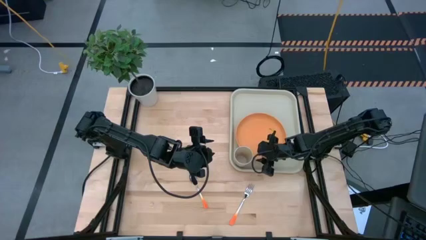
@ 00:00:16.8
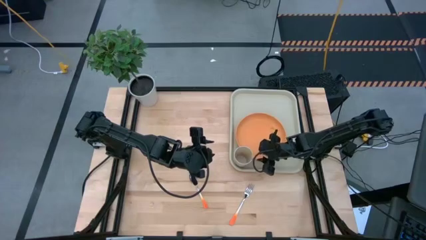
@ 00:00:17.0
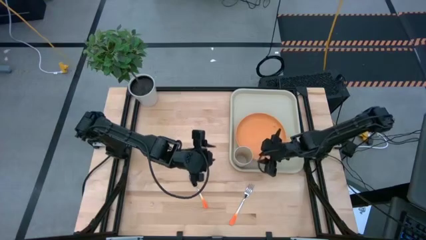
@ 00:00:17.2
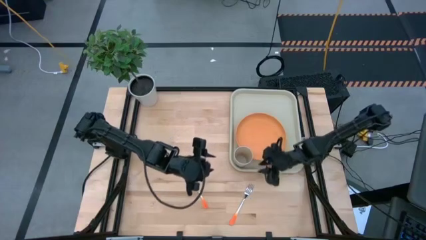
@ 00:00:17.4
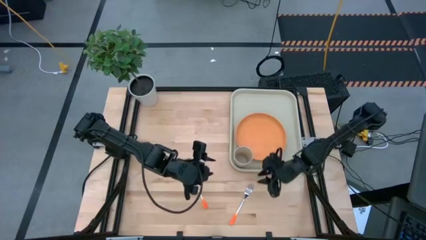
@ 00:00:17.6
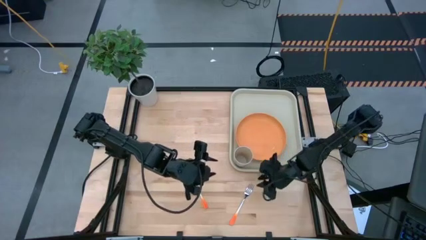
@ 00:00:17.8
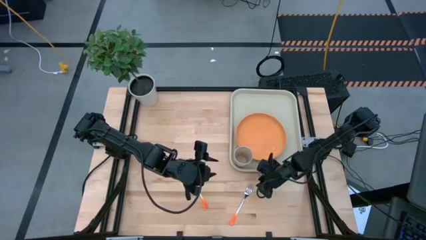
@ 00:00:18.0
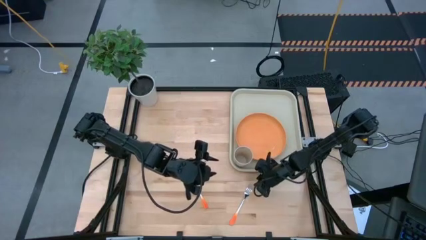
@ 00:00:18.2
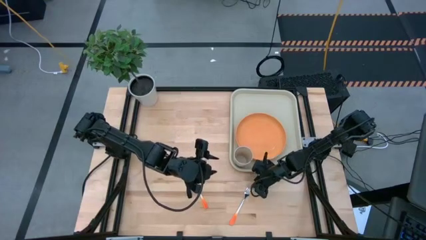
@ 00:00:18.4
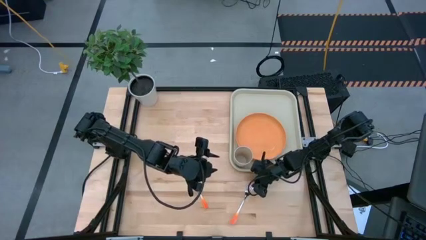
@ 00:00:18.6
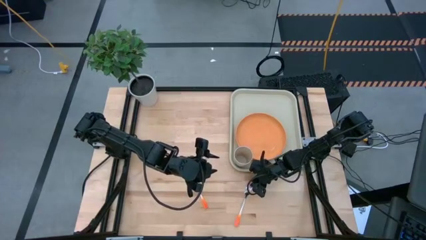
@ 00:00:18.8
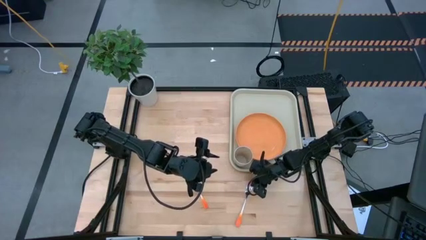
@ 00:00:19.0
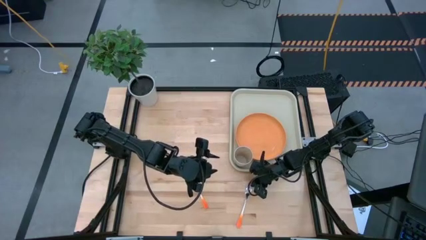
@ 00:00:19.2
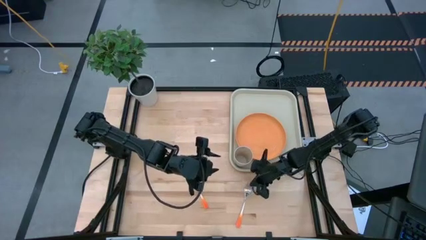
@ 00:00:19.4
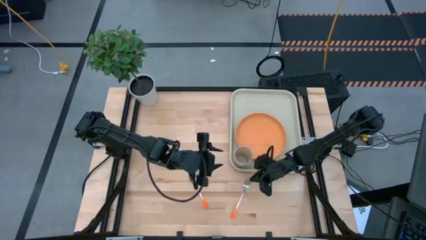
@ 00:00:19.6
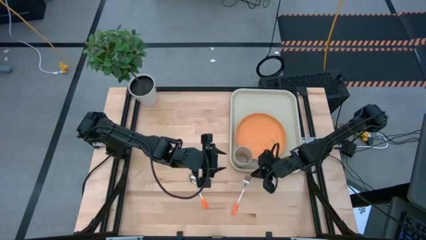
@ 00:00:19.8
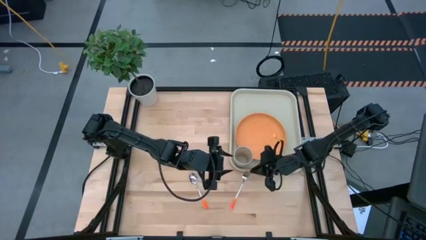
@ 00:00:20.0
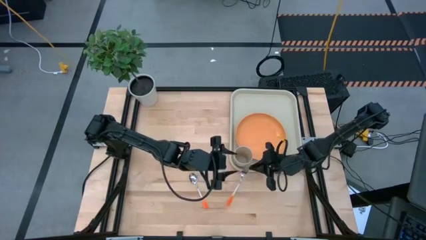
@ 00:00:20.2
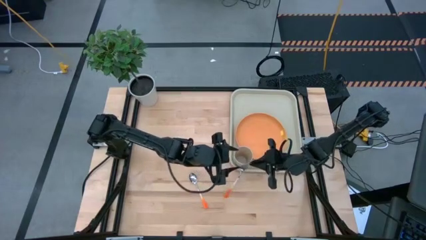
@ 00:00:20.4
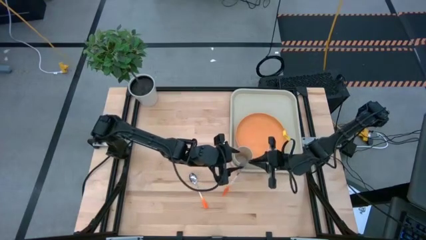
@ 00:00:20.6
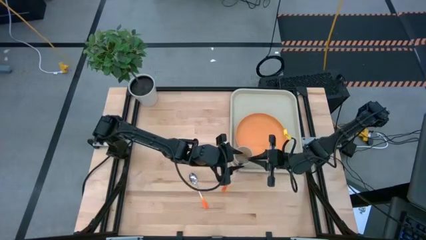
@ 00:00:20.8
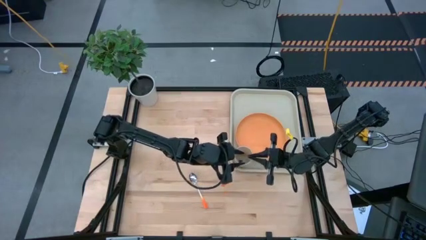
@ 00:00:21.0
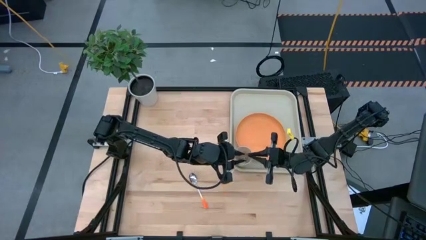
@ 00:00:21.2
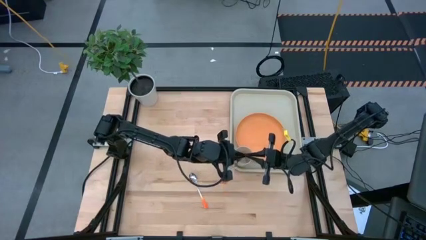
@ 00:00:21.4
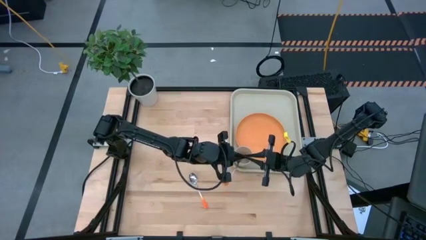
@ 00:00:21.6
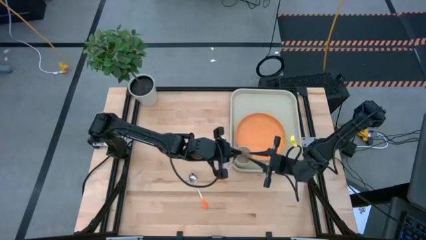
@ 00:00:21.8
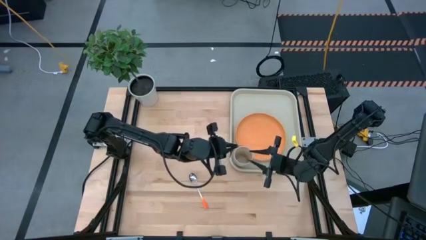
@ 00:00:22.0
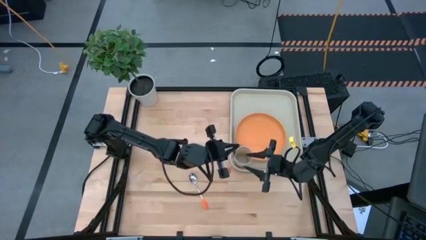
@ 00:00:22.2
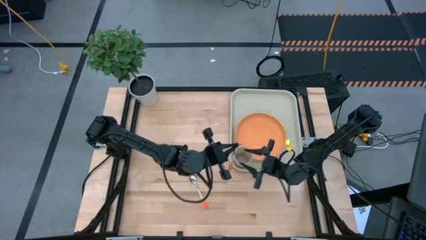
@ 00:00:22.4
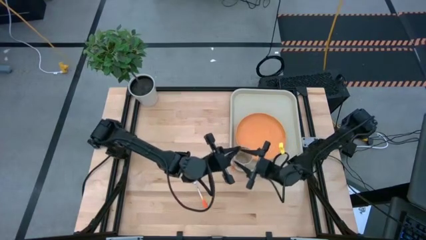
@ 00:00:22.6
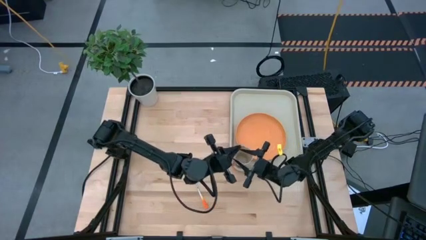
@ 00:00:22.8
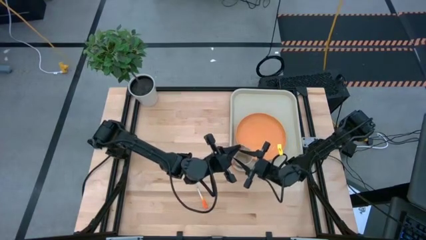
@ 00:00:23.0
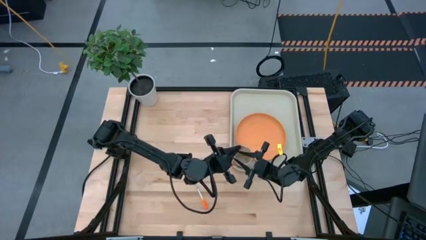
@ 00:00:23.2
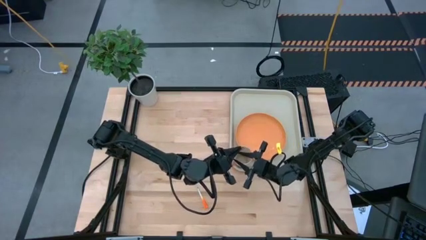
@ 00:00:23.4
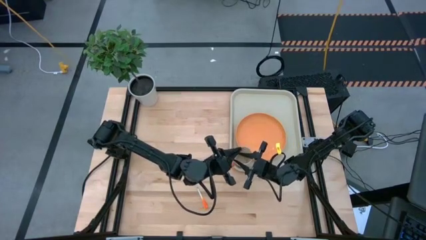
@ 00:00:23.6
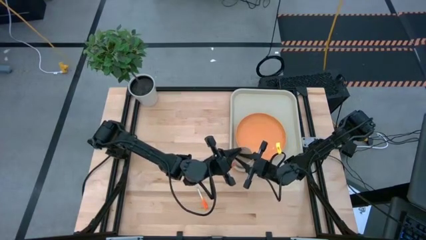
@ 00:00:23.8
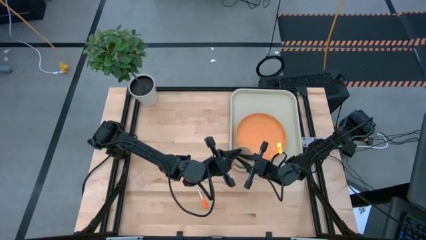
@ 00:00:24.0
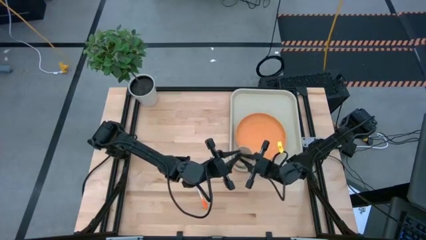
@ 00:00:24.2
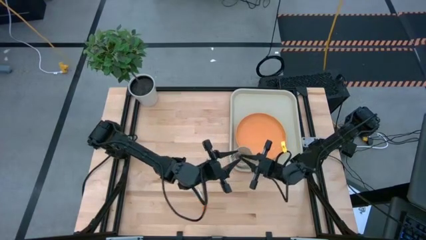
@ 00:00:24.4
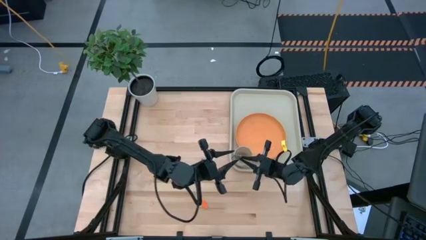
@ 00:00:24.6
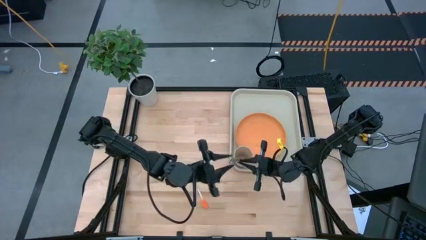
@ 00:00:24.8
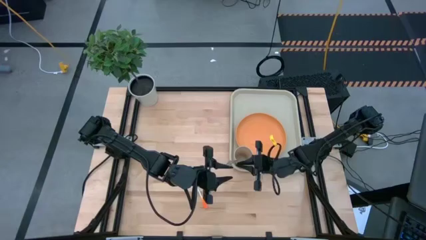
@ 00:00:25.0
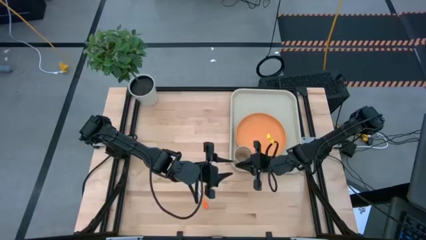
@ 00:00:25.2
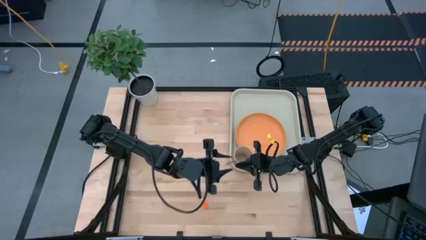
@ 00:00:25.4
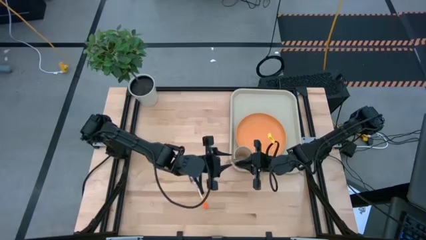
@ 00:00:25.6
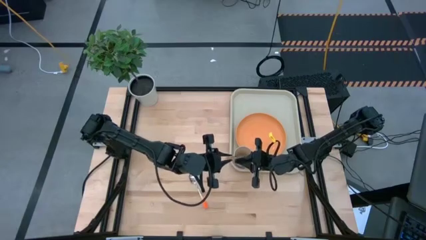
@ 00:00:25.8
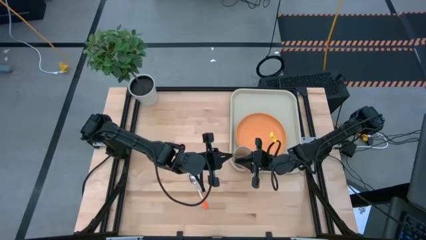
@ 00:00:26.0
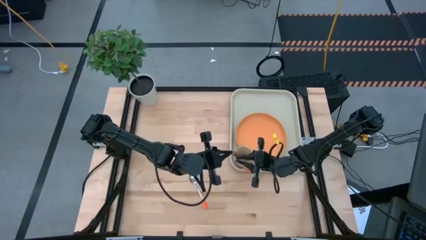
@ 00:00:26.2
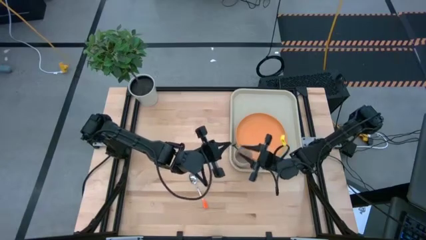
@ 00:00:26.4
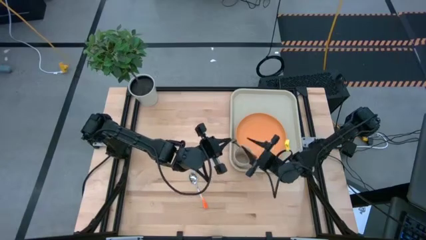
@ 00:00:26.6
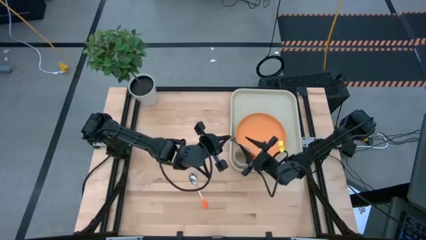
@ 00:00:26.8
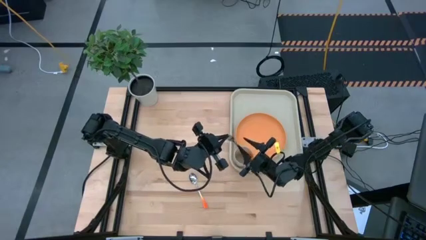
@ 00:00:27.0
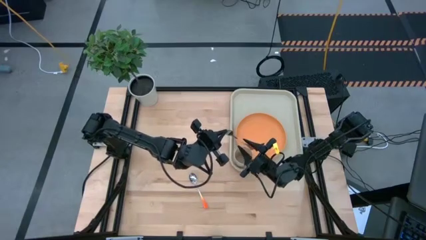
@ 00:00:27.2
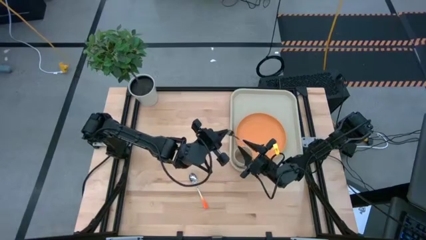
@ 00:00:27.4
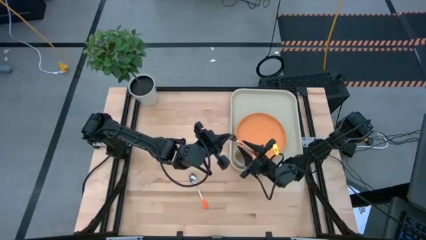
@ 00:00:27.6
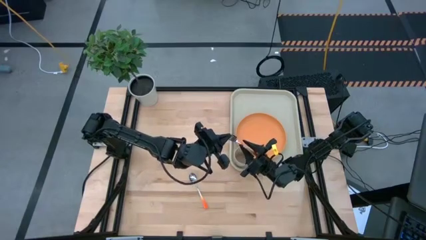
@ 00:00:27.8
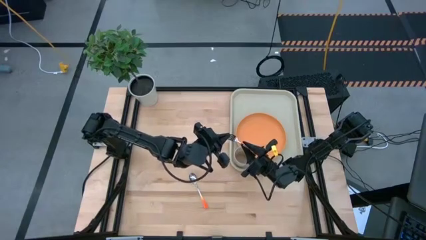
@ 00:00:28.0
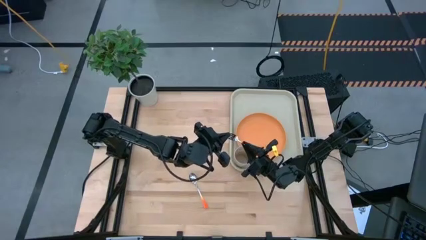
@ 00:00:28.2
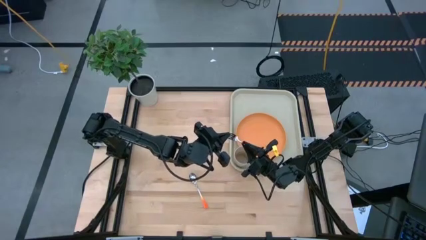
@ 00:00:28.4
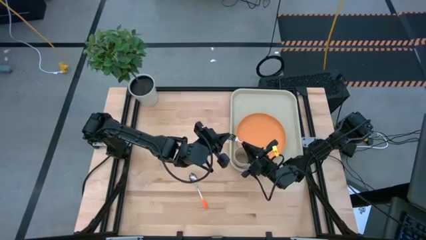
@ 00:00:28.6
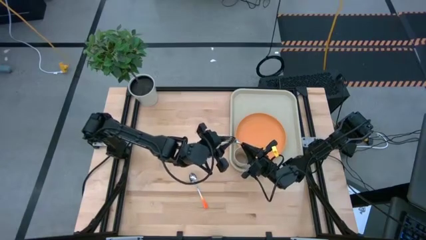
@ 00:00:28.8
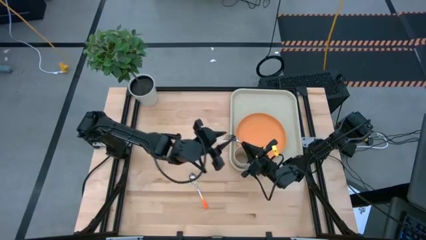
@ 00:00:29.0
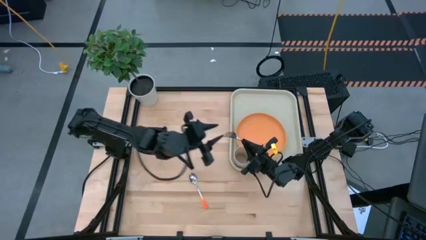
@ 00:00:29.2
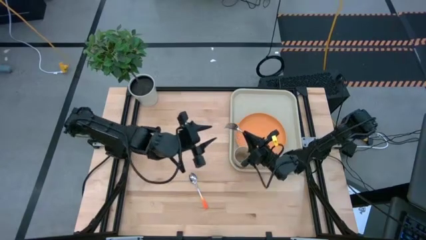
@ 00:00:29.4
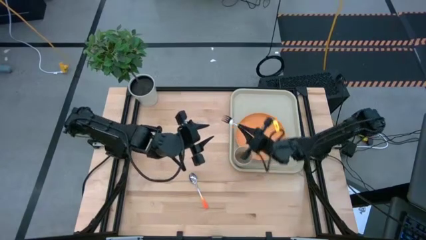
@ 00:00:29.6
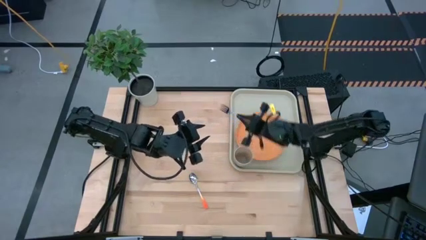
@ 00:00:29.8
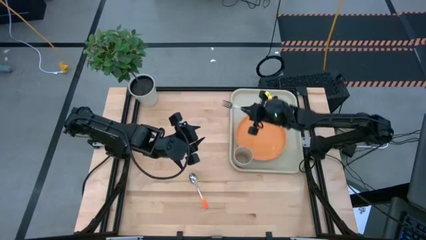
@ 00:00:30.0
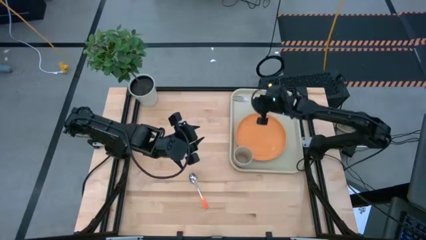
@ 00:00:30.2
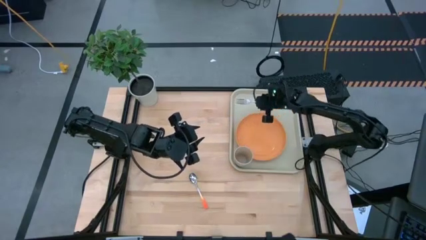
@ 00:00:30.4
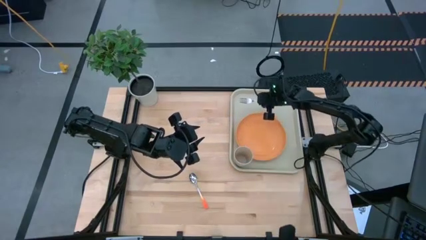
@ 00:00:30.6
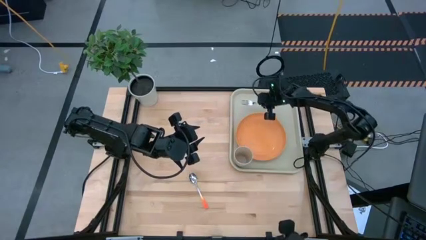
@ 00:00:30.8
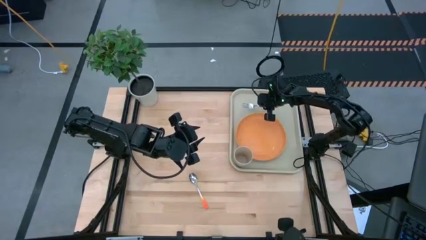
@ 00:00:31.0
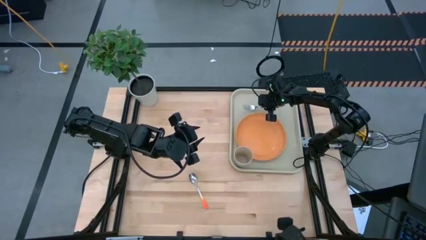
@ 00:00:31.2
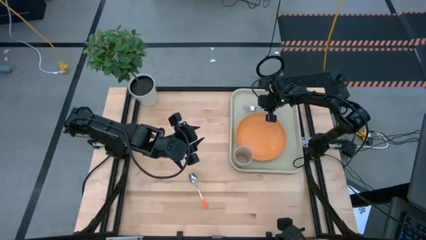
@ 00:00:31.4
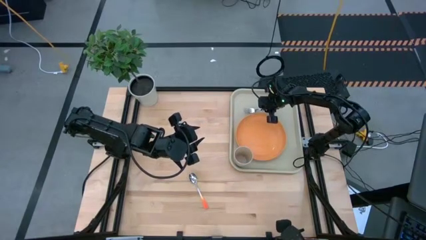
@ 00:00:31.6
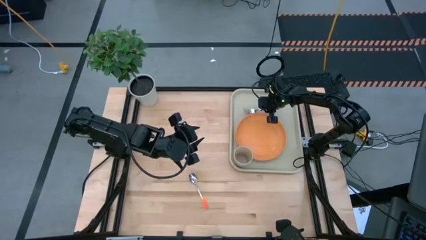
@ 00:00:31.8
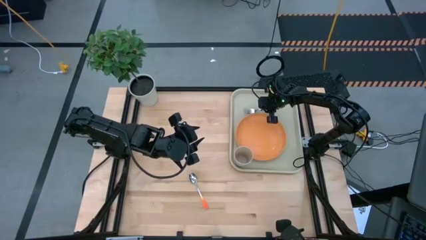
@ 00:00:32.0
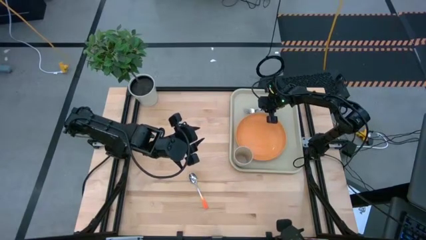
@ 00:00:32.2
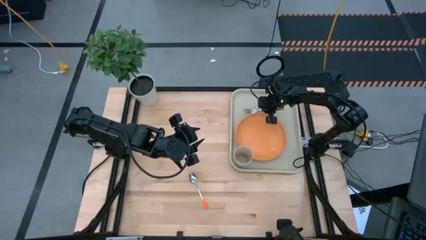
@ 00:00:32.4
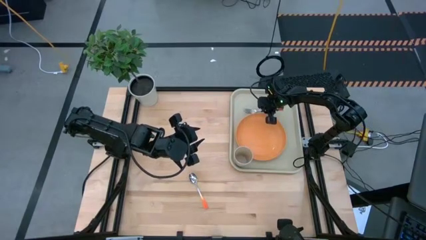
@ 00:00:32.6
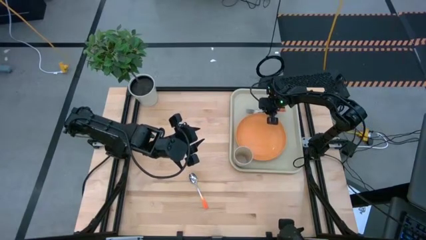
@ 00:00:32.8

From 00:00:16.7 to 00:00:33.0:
Task: Pick and place plate/cup/fork/spoon on tray
Put the orange fork on the gray tray to the top of the orange plate
